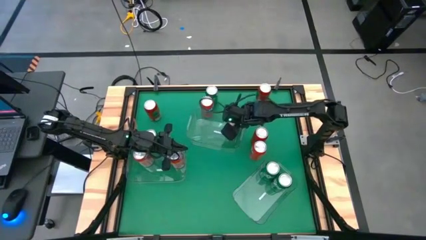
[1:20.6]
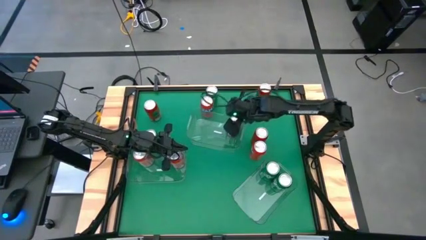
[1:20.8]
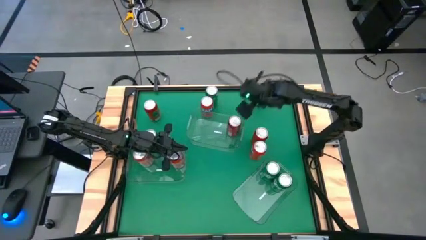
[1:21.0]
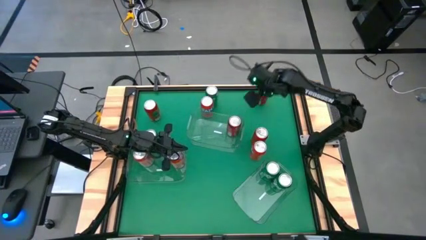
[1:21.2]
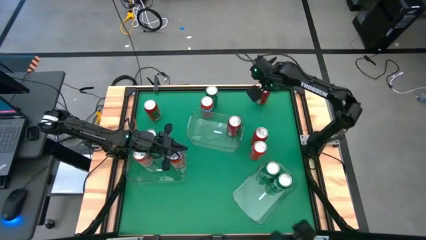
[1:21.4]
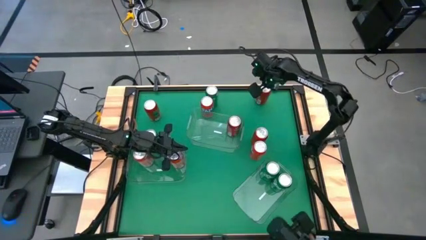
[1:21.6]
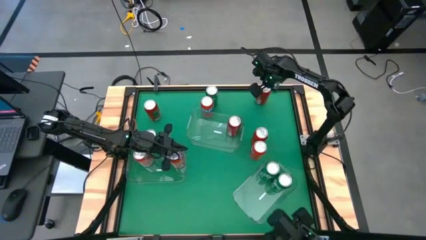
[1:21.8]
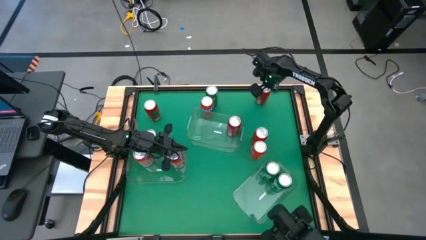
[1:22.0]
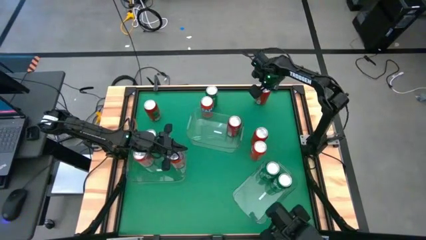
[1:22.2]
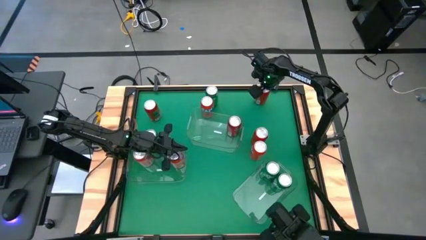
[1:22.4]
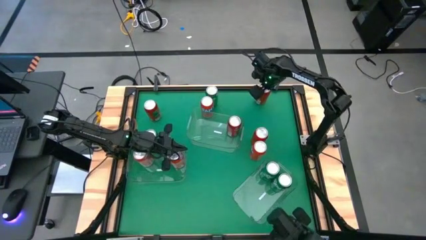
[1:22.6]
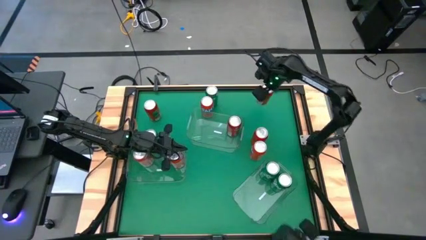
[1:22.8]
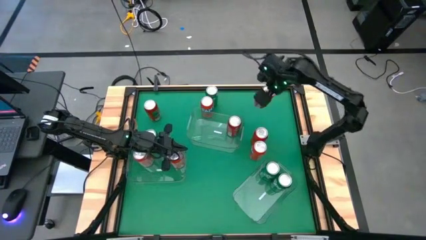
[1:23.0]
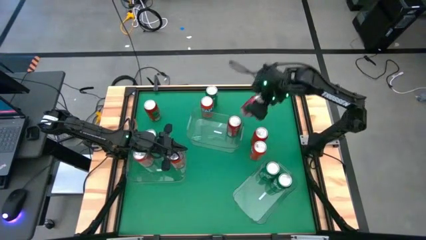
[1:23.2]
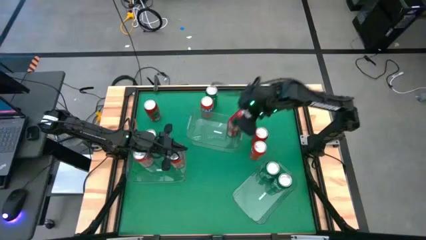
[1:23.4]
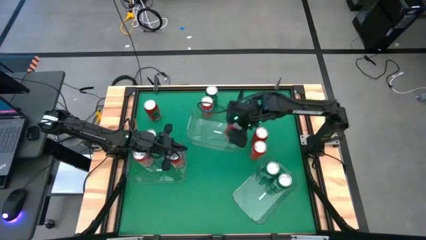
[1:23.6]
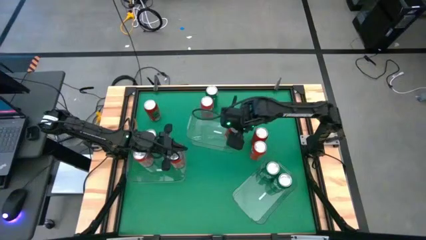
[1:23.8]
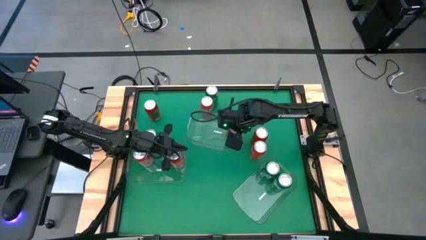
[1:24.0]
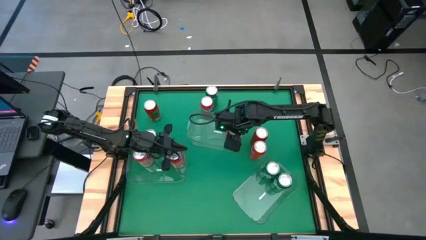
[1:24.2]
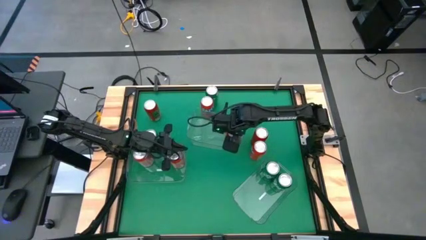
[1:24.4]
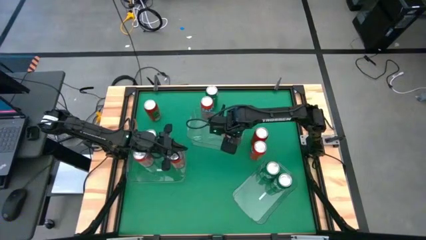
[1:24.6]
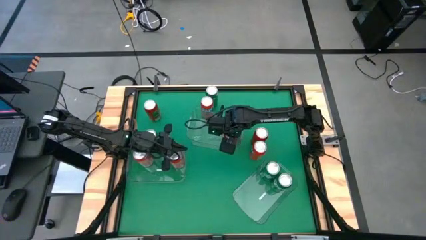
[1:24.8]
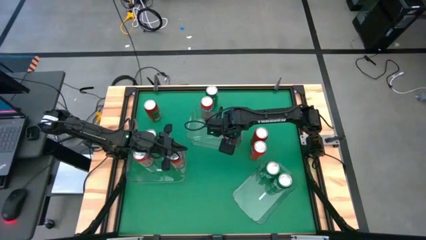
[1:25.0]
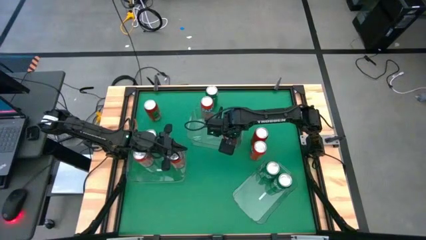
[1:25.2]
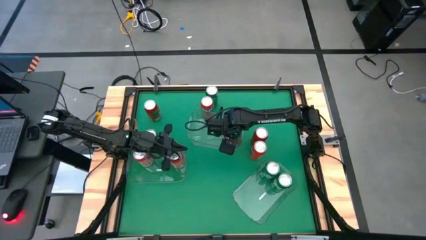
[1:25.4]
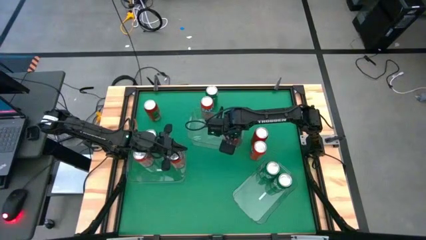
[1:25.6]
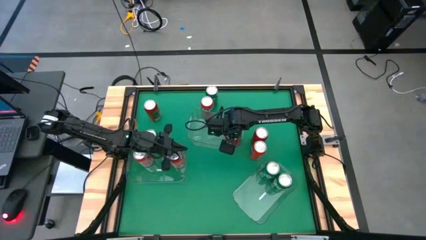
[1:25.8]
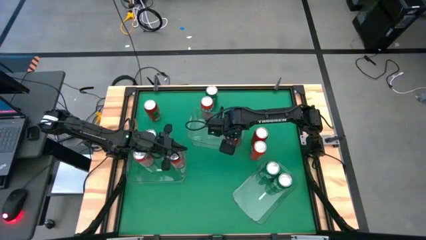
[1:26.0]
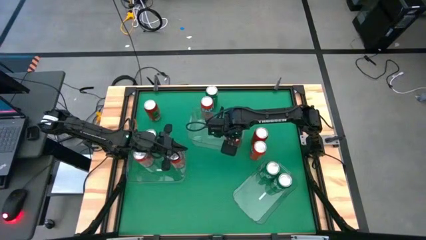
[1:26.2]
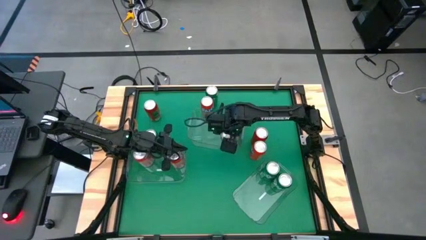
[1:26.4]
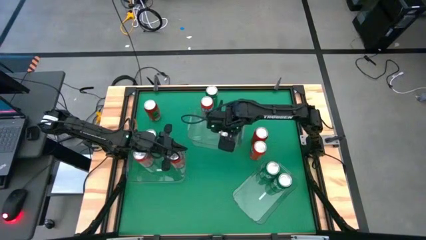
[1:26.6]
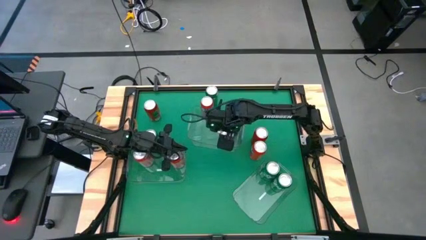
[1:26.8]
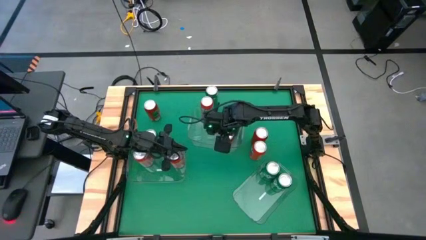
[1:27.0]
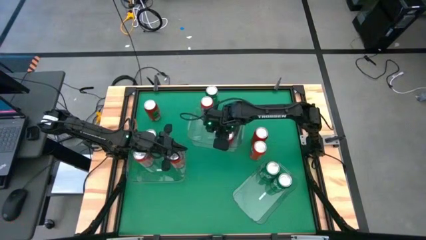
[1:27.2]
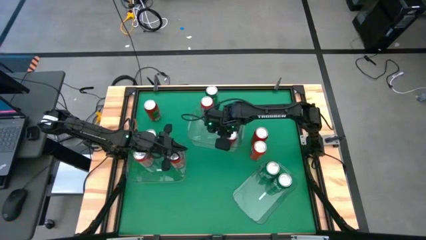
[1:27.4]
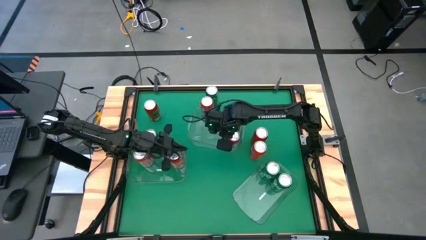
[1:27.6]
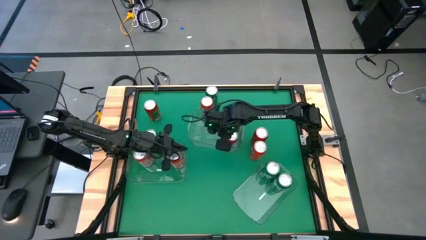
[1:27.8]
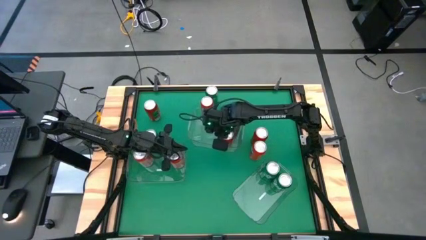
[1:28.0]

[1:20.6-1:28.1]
Task: Sort soda cans
Put the top red black soda can into the top transparent bin

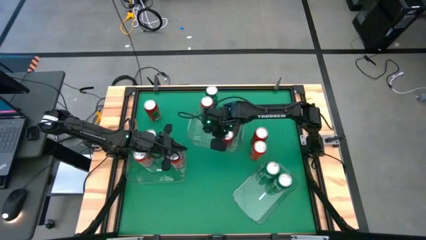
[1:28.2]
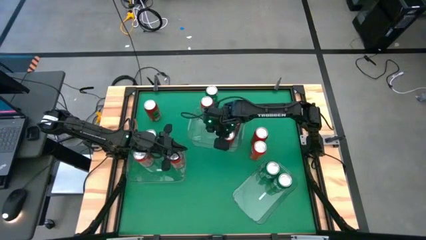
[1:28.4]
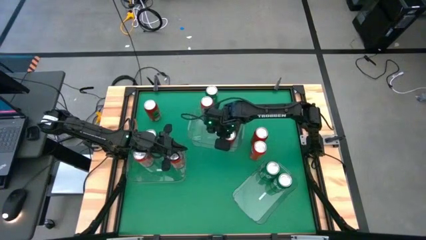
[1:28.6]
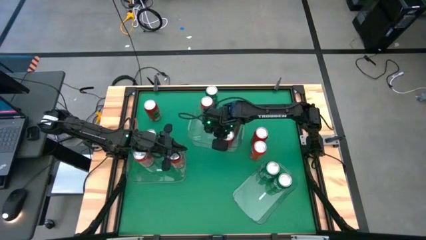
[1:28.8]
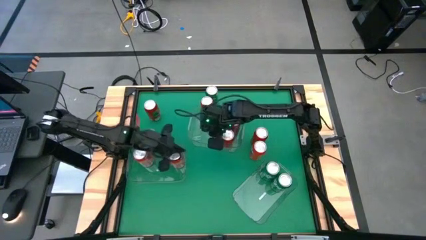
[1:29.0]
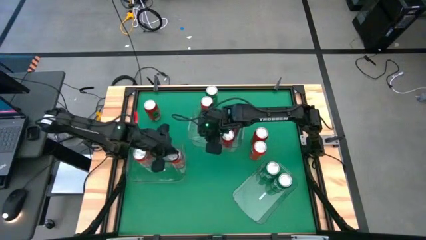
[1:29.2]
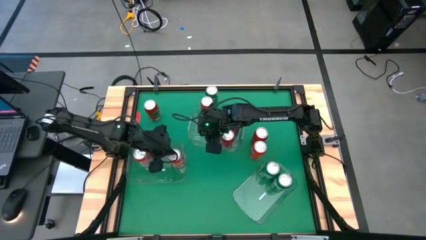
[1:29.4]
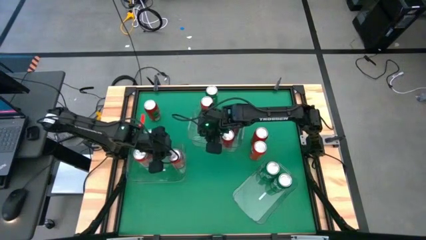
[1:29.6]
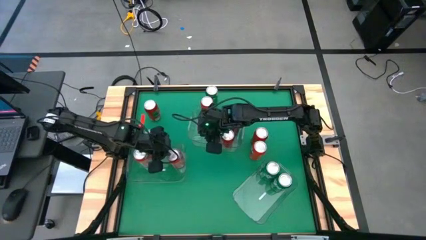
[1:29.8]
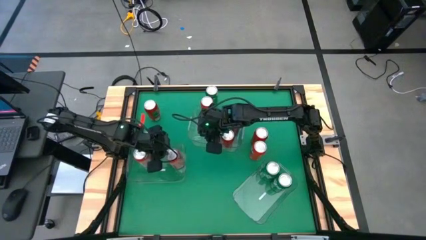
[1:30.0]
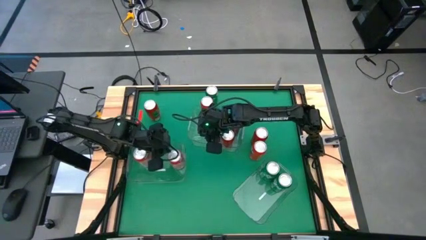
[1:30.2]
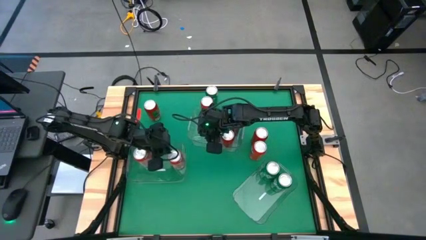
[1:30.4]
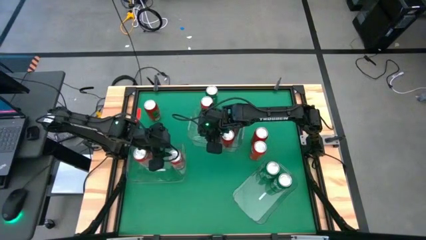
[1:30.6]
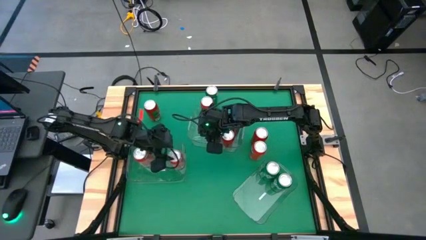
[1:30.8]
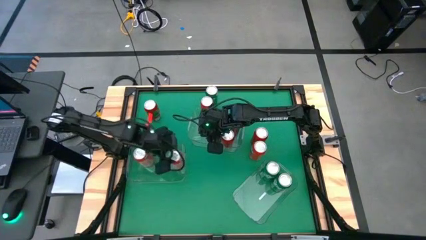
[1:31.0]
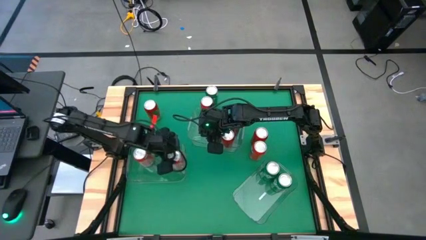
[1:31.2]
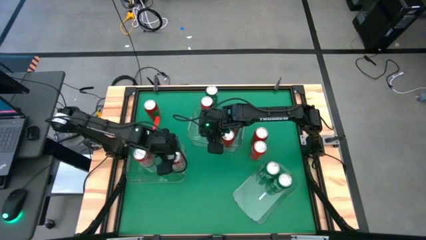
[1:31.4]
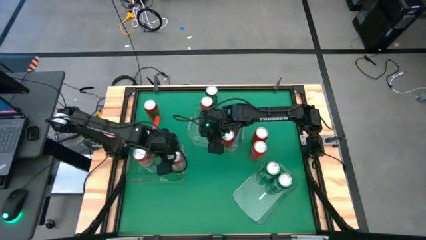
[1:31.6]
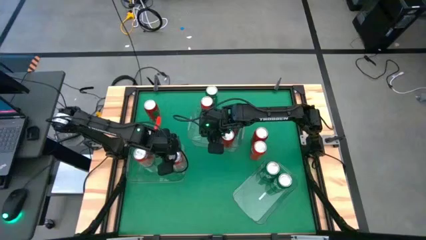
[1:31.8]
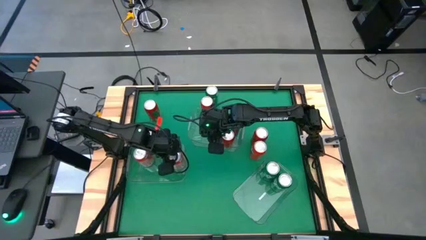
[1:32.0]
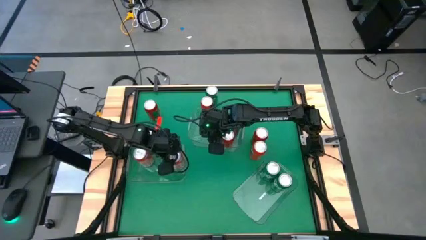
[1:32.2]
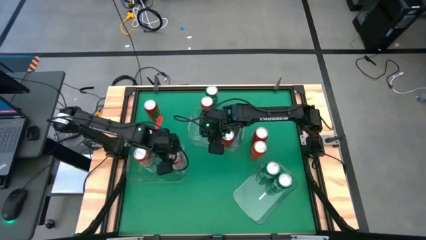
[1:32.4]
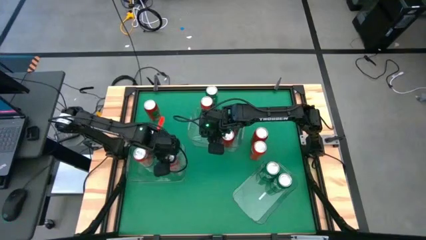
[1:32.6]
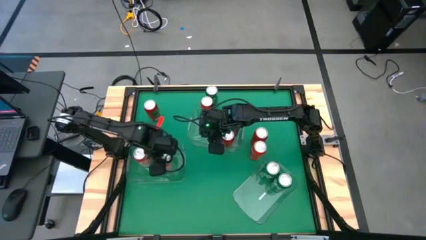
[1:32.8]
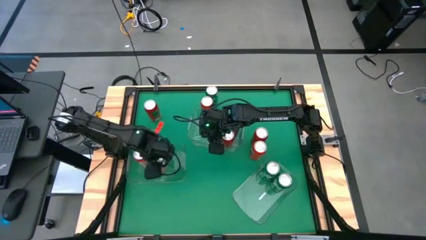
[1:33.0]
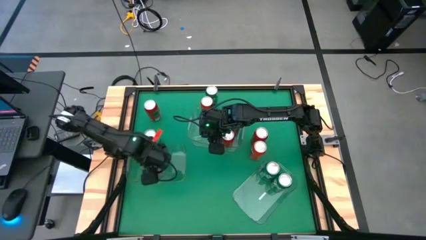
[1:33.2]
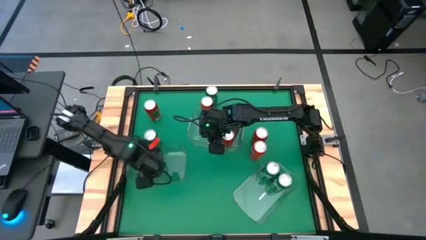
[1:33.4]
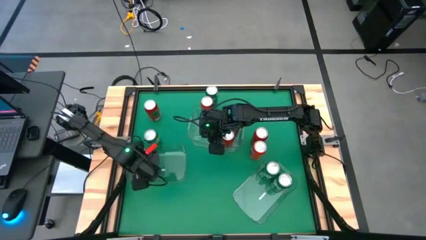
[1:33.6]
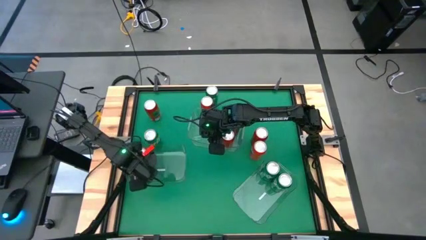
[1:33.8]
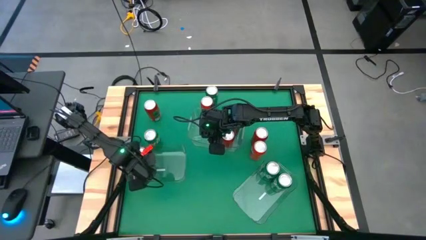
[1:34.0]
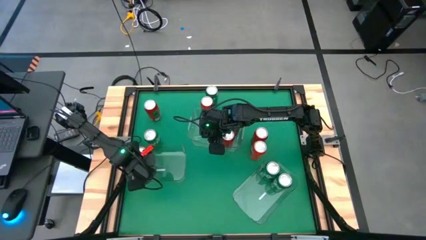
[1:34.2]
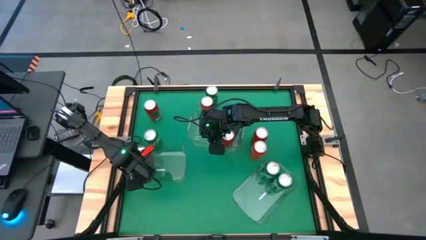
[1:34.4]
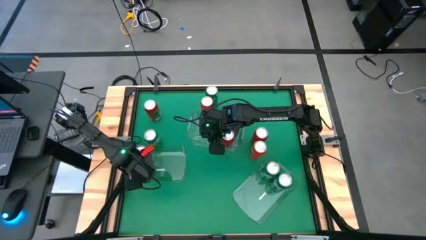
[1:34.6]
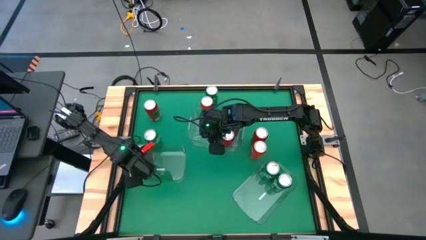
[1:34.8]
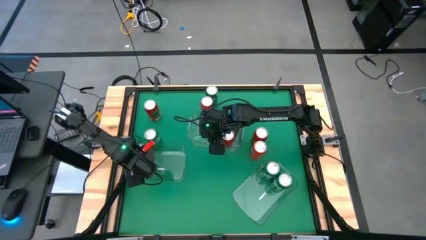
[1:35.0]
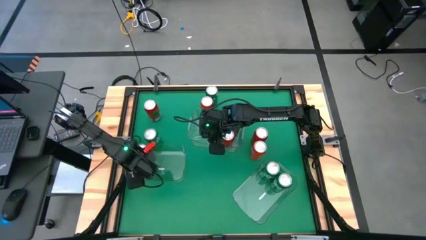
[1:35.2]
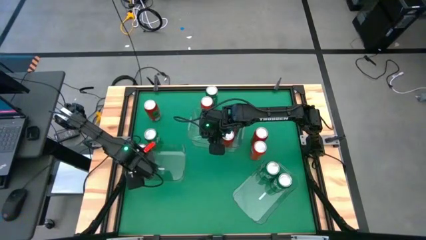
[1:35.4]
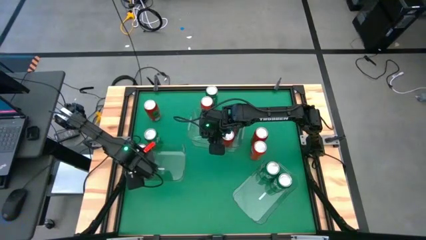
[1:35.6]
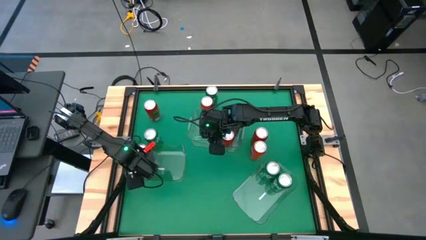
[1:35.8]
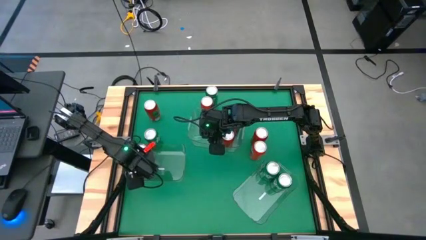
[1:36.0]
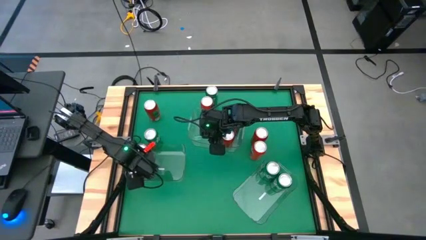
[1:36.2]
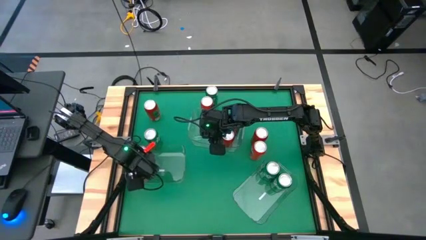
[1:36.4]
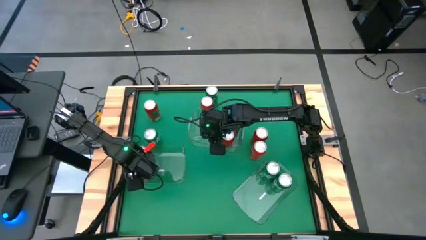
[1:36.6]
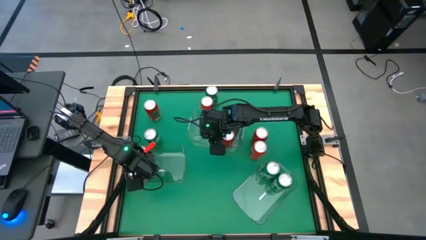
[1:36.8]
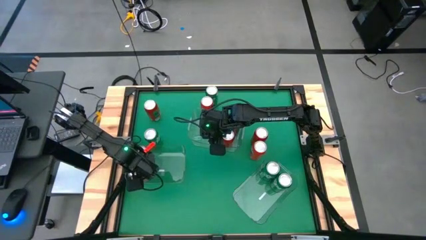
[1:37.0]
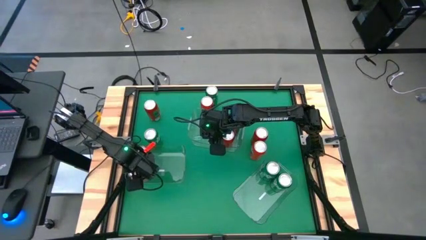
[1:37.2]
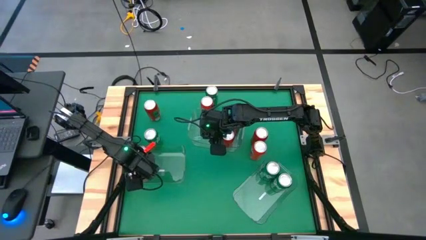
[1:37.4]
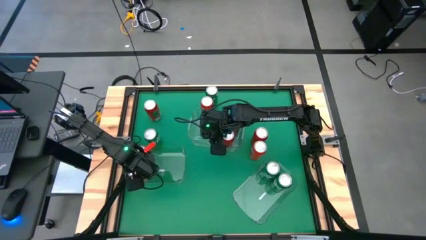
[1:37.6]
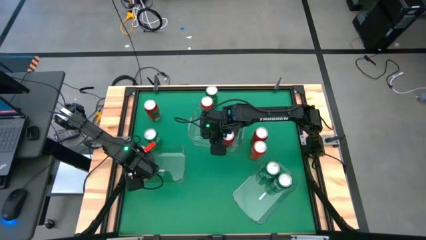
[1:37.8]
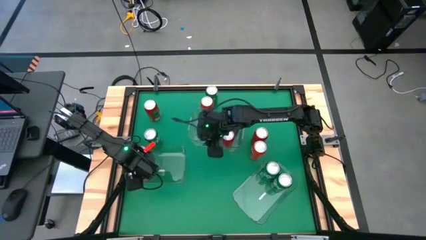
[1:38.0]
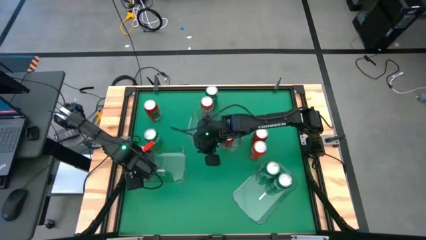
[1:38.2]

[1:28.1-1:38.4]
Adjust the red soda can in the bottom left transparent bin
